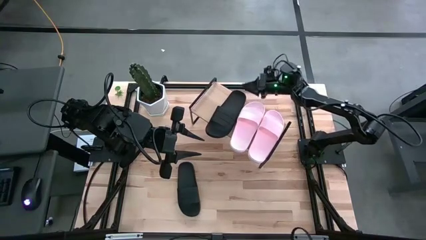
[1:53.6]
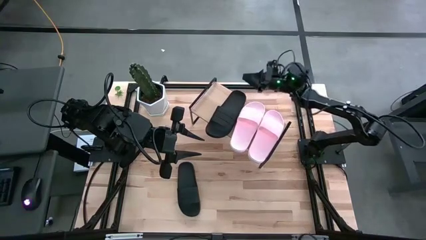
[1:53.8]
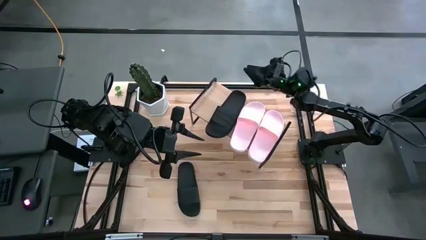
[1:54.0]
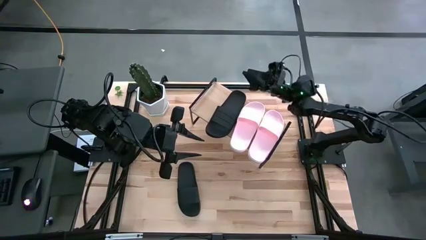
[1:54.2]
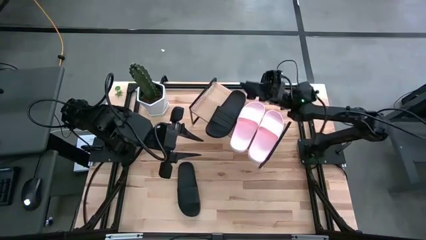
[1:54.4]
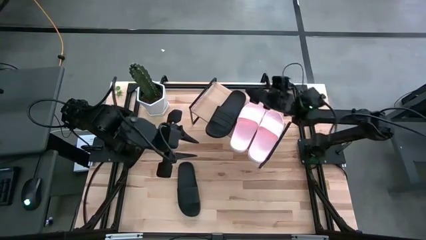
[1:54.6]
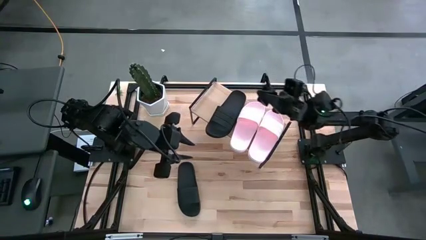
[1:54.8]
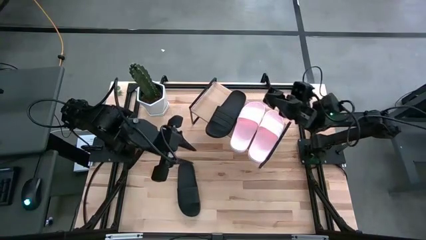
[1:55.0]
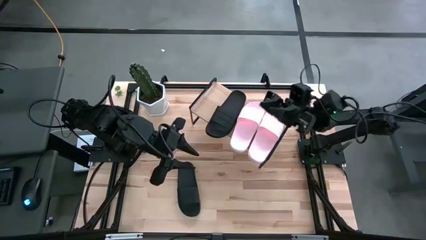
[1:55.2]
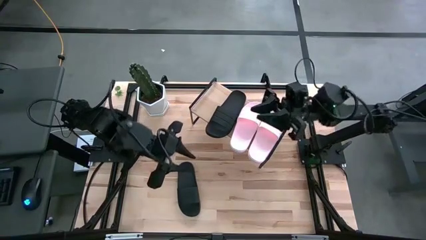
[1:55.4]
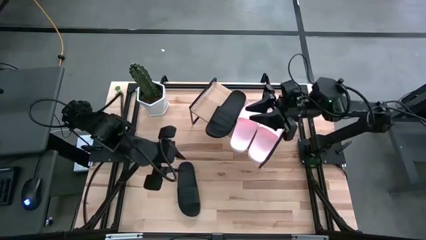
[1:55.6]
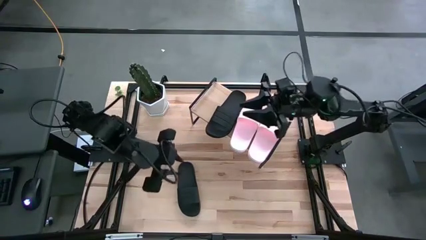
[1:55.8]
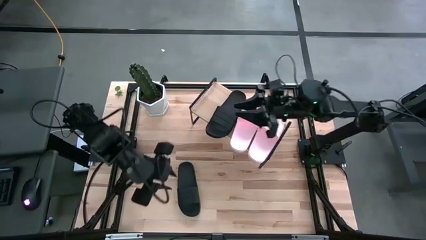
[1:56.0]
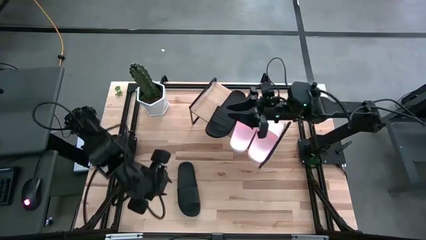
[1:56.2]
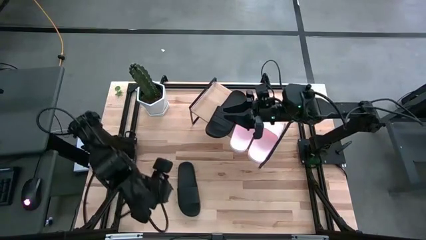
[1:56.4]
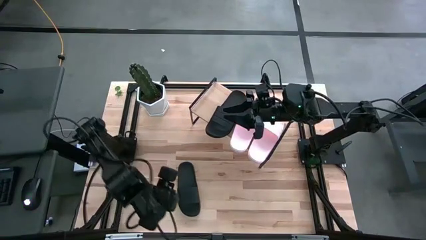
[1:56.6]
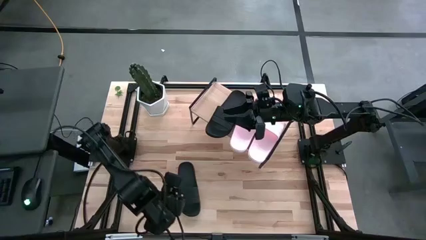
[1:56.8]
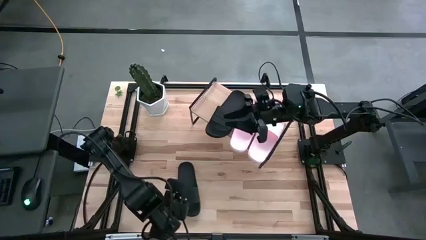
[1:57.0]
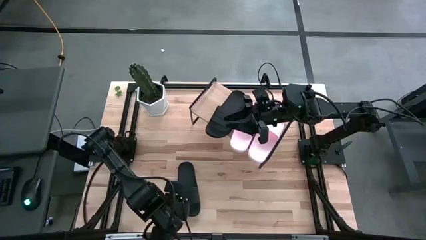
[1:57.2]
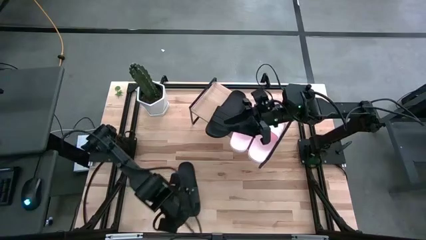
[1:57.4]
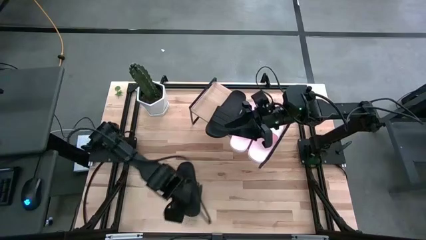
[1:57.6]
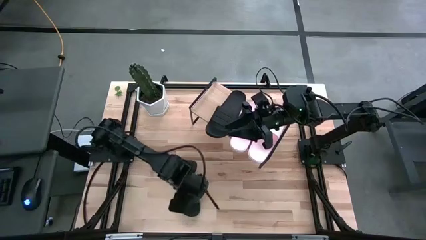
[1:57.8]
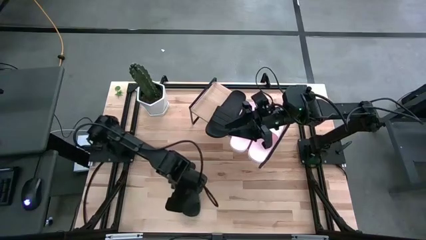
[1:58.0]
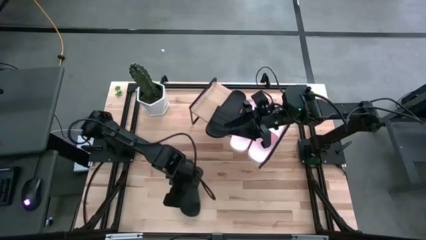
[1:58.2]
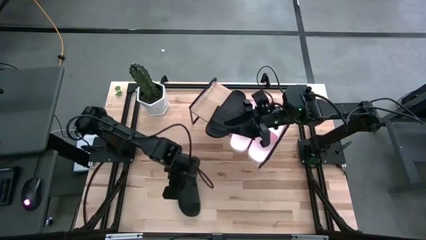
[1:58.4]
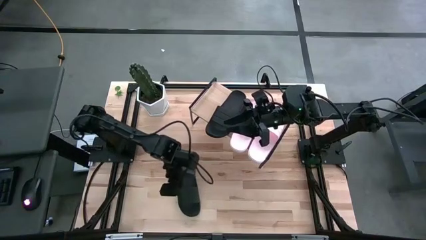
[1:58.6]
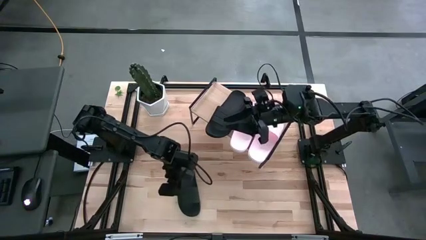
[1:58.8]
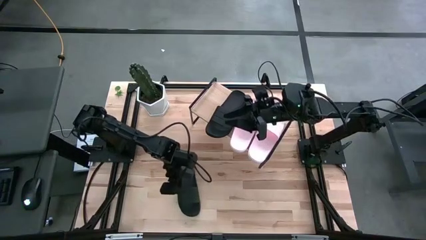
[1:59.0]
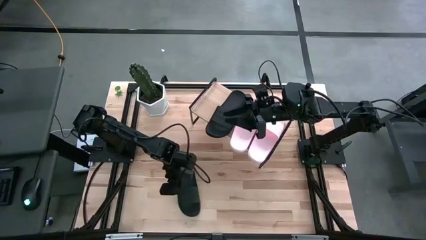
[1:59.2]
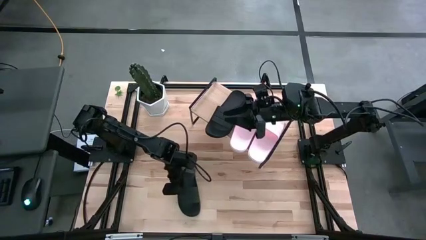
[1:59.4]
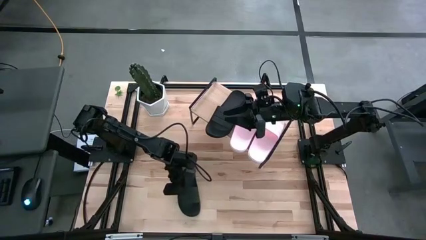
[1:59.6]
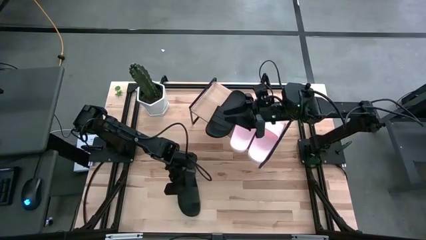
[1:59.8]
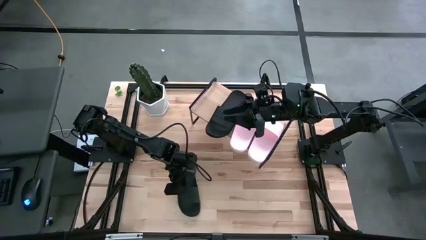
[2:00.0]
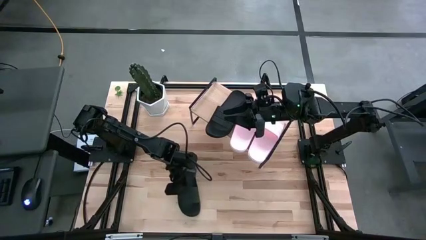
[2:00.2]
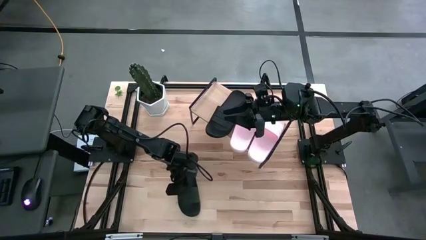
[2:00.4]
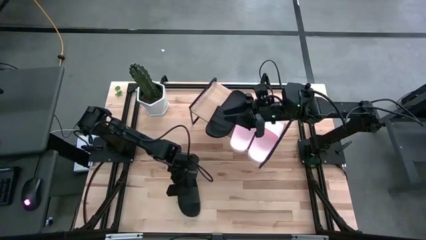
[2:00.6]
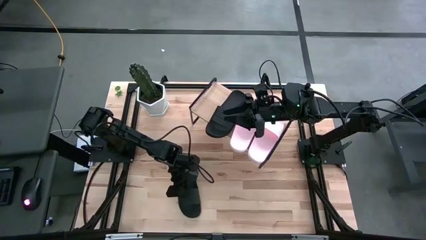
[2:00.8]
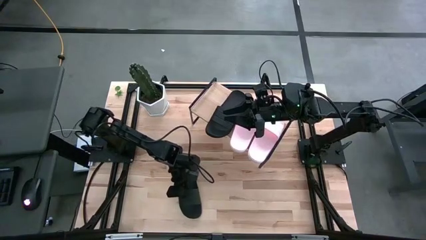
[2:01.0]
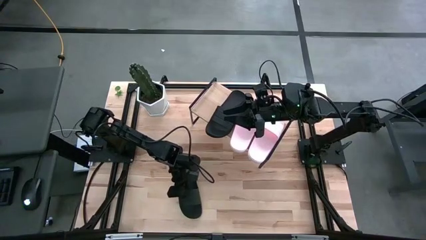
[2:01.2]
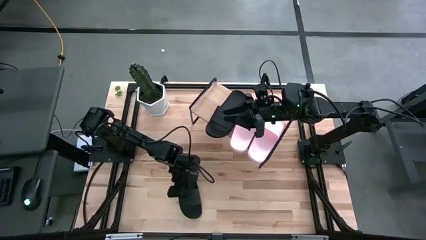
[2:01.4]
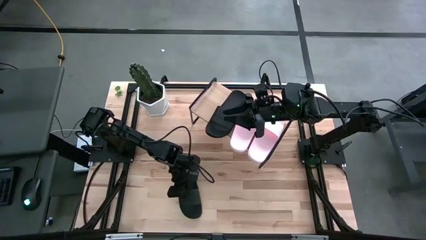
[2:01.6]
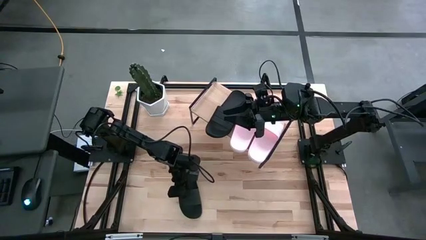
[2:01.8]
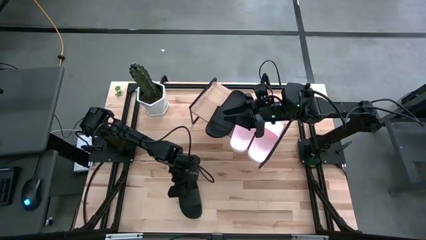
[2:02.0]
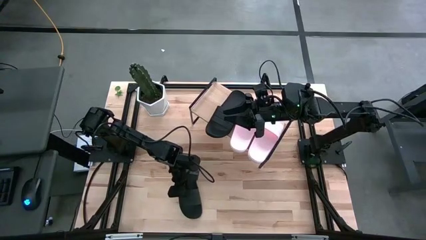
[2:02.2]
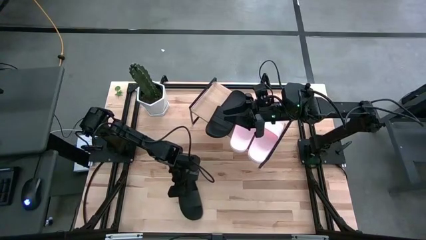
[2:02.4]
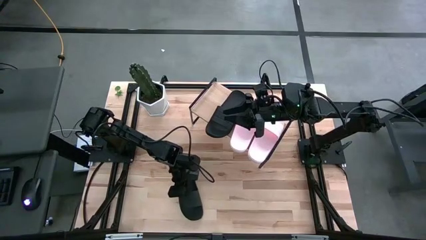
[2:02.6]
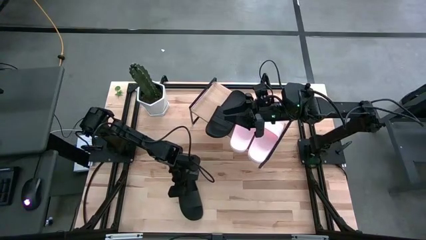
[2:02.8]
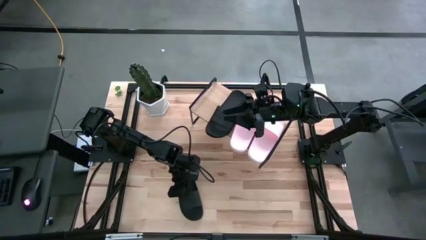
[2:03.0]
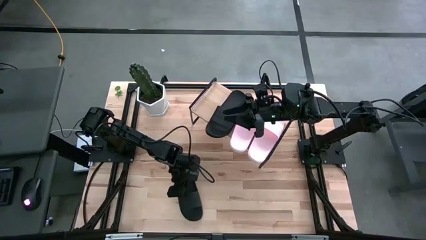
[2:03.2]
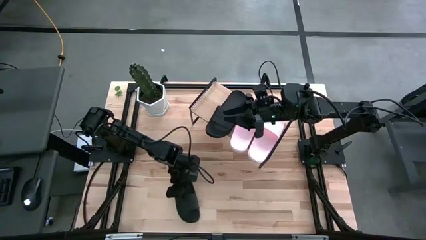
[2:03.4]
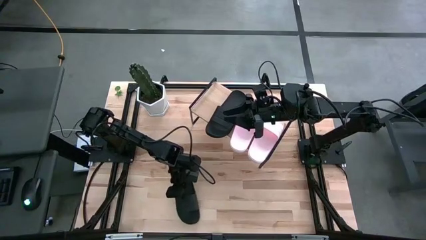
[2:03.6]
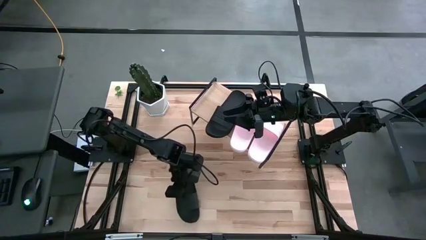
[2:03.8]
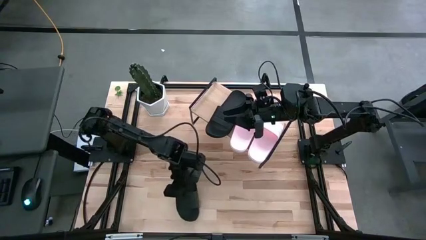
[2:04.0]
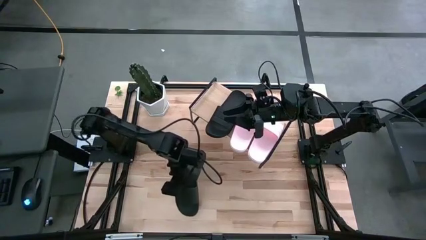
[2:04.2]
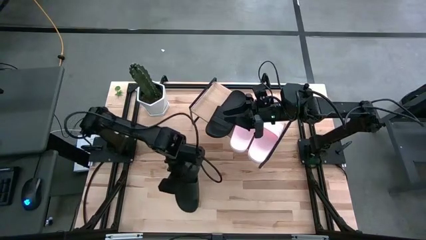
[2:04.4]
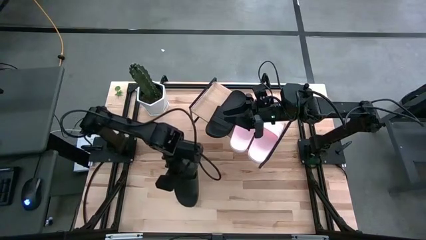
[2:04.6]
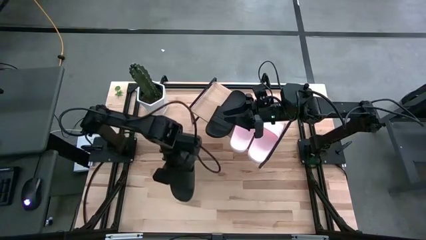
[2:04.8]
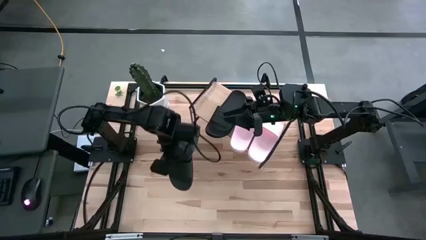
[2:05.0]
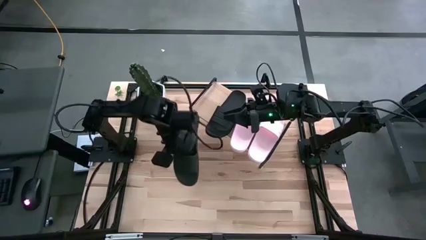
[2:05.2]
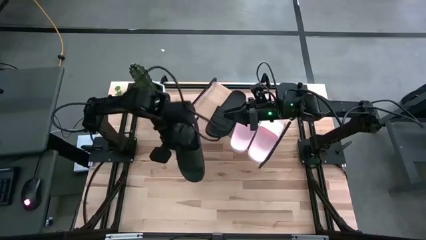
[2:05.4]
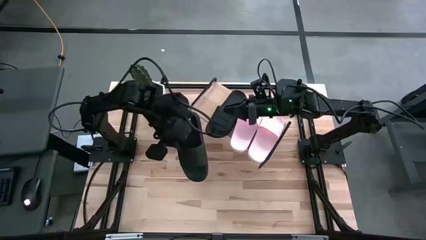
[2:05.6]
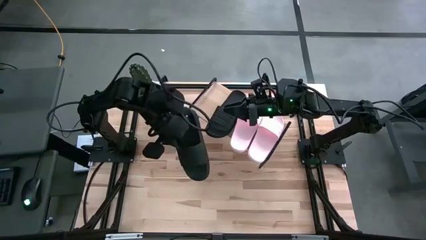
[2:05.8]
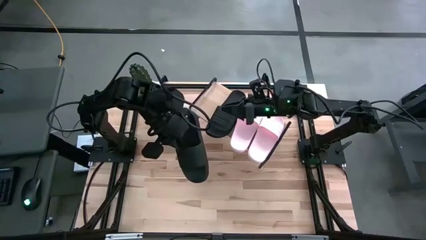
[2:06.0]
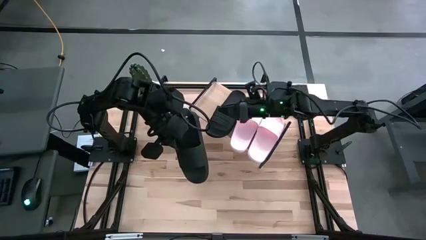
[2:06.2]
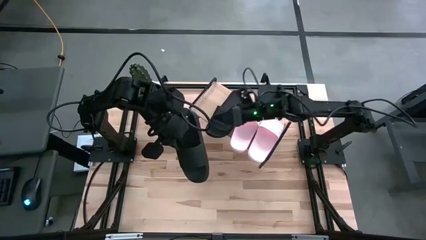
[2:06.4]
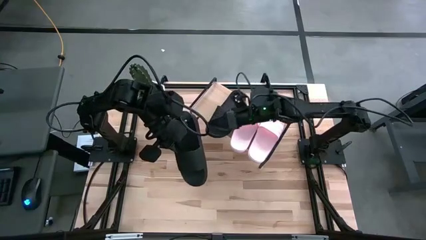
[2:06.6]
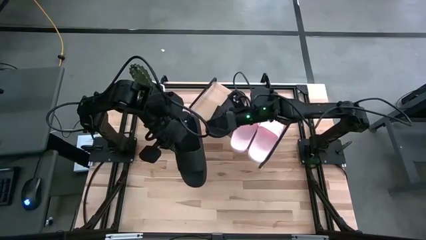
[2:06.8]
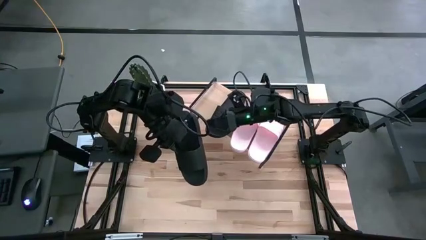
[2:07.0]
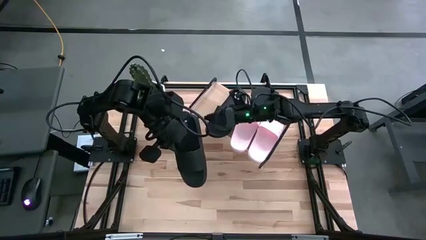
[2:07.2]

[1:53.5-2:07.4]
Task: Pick and place slides into the shelf
Put the black slipper on the shelf
